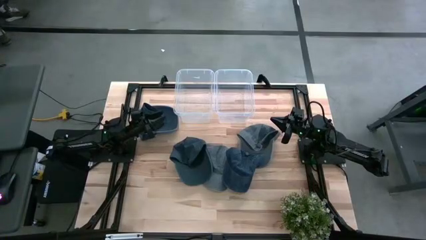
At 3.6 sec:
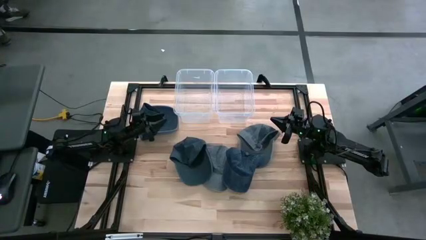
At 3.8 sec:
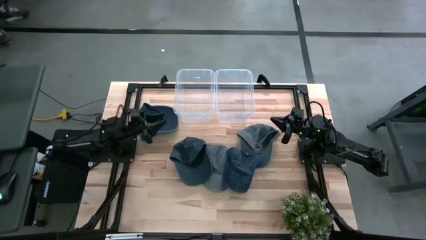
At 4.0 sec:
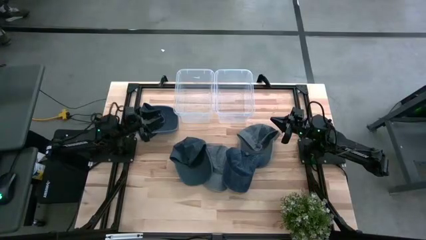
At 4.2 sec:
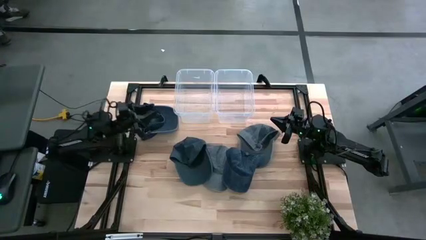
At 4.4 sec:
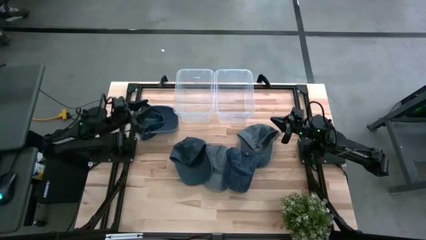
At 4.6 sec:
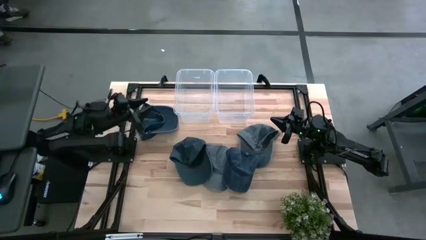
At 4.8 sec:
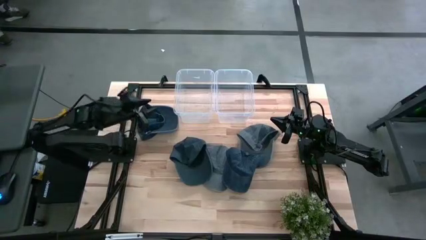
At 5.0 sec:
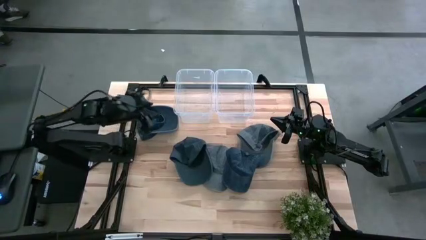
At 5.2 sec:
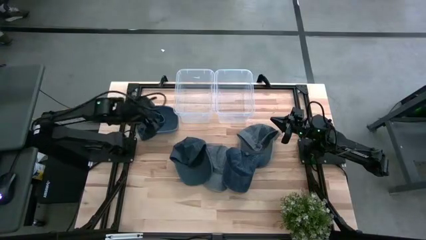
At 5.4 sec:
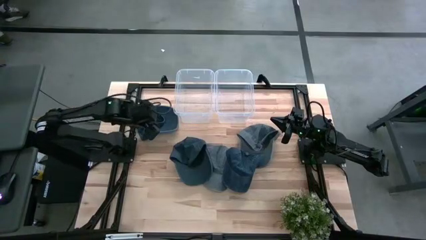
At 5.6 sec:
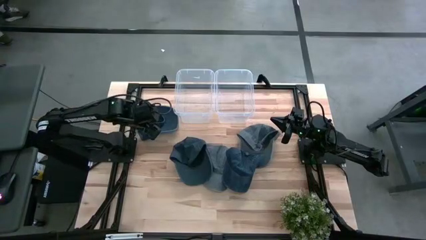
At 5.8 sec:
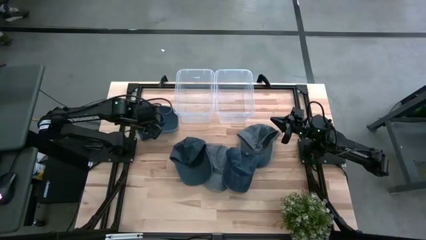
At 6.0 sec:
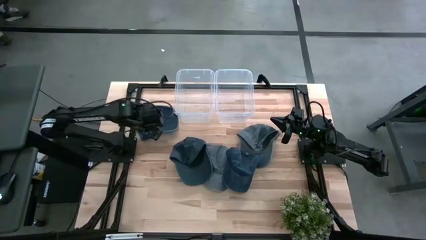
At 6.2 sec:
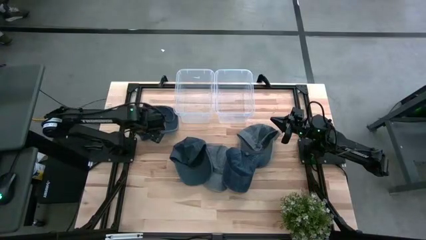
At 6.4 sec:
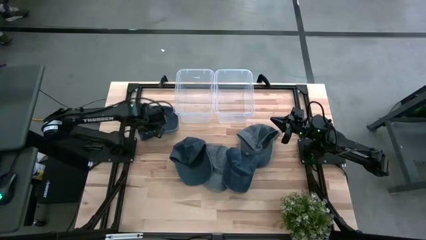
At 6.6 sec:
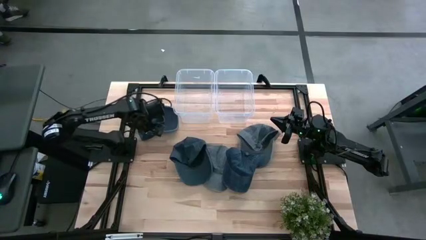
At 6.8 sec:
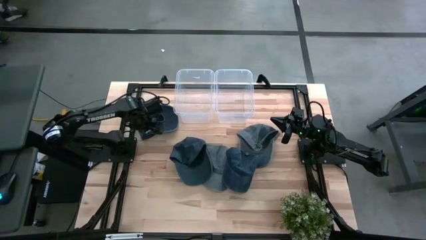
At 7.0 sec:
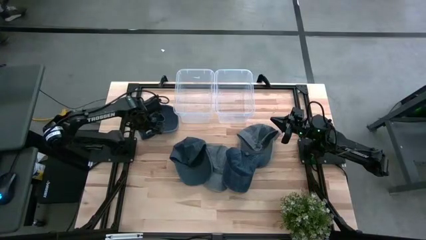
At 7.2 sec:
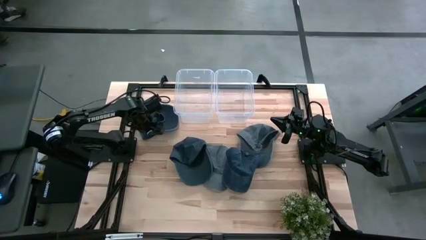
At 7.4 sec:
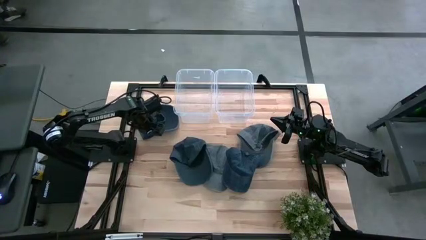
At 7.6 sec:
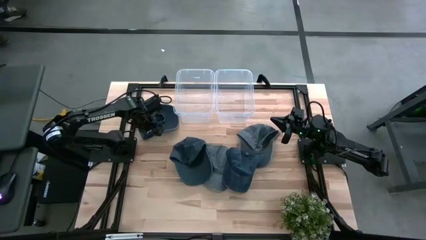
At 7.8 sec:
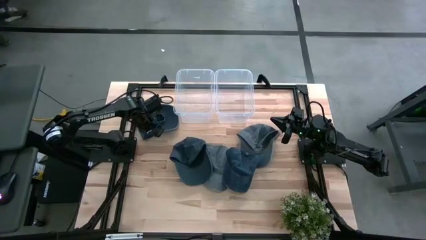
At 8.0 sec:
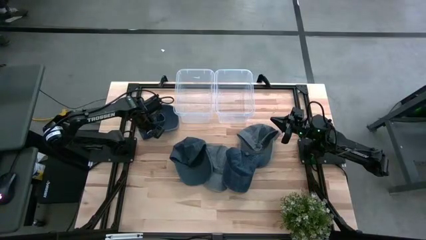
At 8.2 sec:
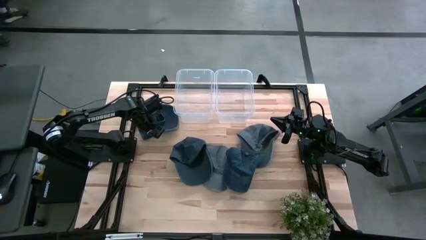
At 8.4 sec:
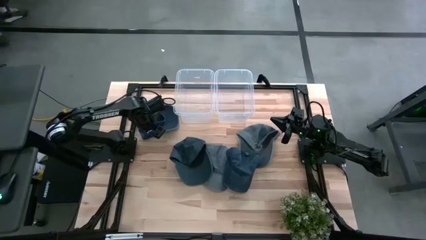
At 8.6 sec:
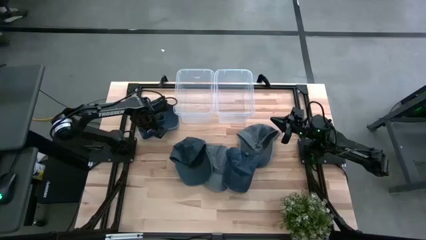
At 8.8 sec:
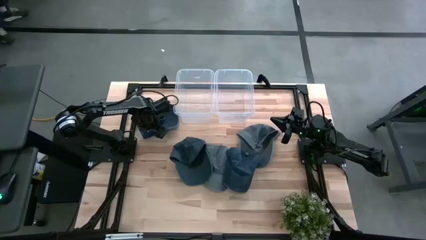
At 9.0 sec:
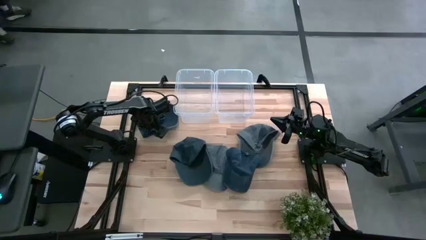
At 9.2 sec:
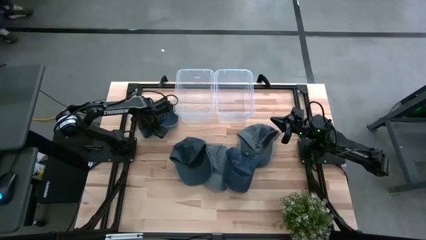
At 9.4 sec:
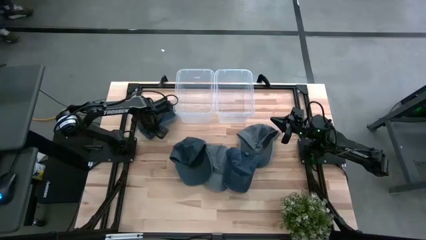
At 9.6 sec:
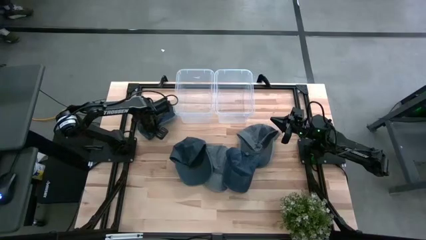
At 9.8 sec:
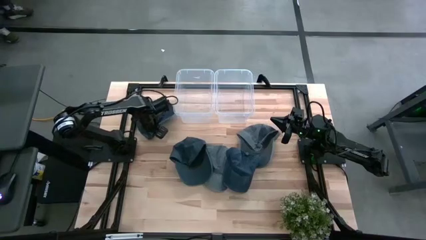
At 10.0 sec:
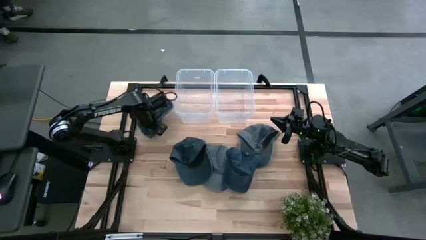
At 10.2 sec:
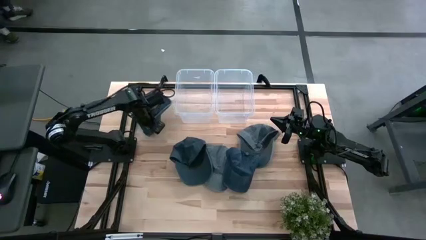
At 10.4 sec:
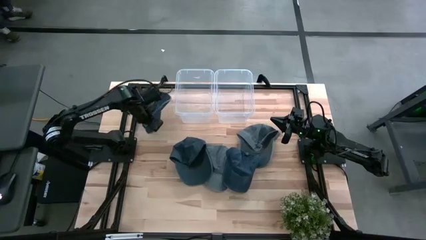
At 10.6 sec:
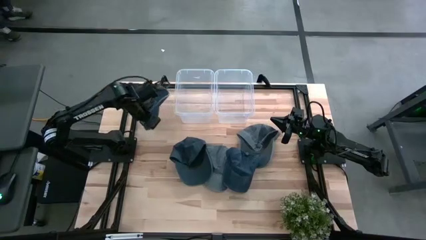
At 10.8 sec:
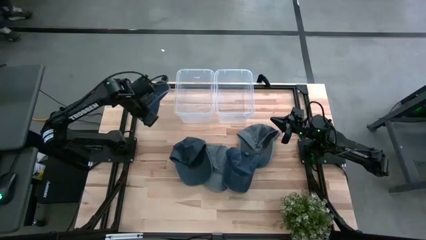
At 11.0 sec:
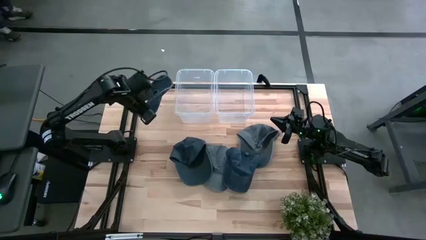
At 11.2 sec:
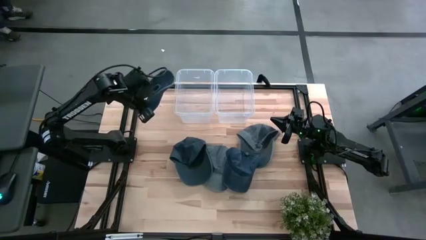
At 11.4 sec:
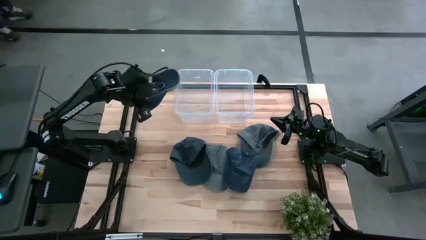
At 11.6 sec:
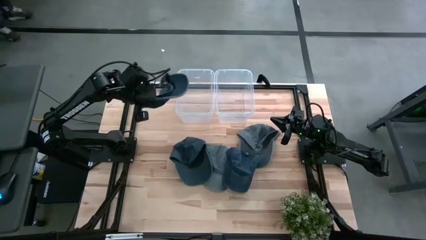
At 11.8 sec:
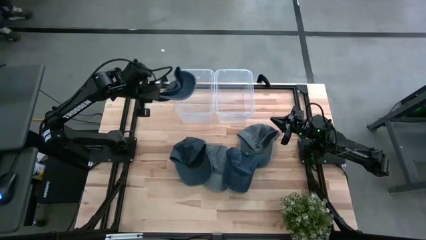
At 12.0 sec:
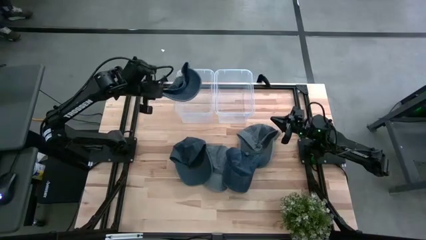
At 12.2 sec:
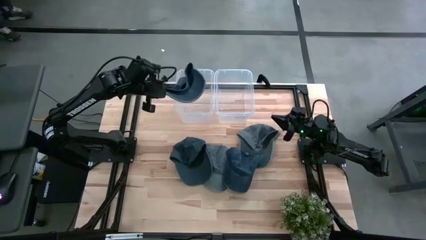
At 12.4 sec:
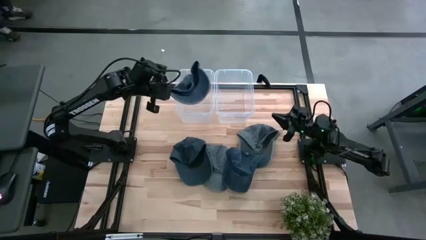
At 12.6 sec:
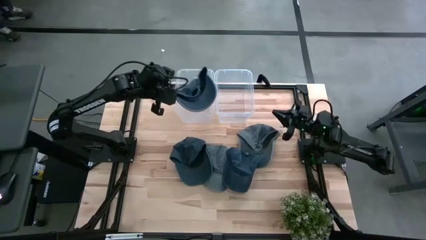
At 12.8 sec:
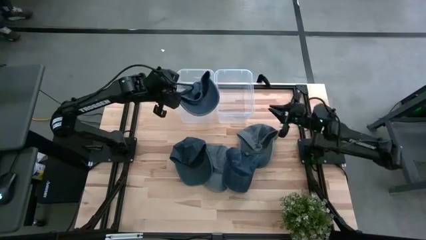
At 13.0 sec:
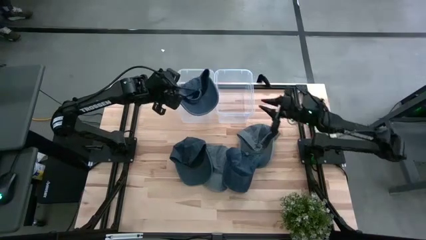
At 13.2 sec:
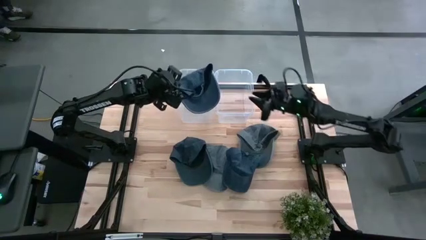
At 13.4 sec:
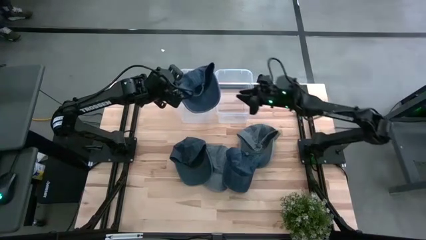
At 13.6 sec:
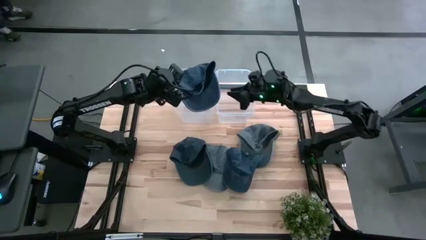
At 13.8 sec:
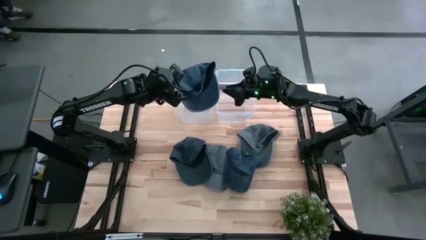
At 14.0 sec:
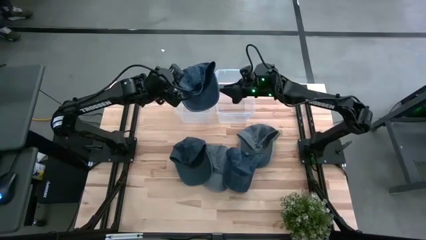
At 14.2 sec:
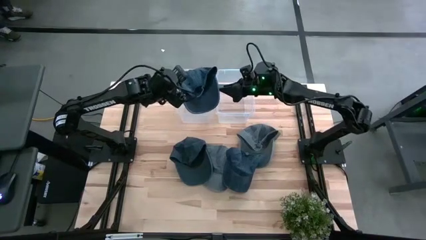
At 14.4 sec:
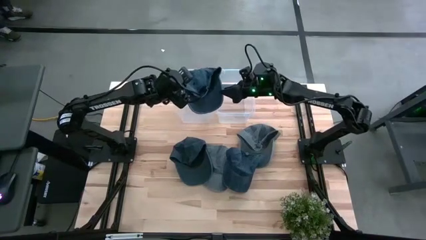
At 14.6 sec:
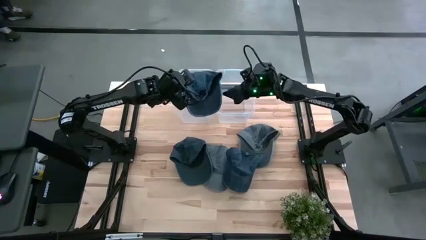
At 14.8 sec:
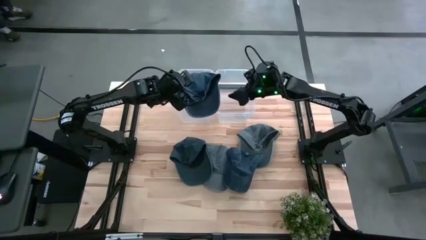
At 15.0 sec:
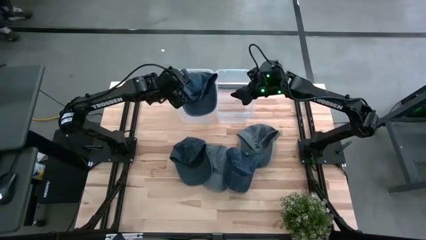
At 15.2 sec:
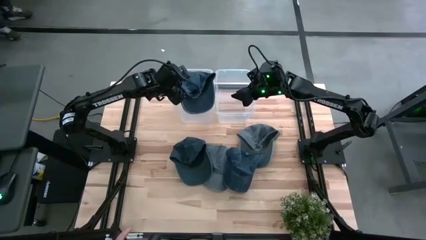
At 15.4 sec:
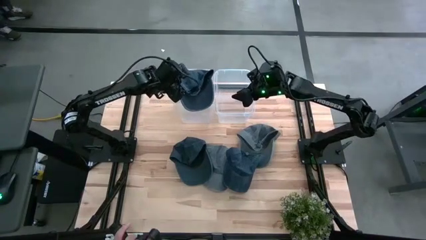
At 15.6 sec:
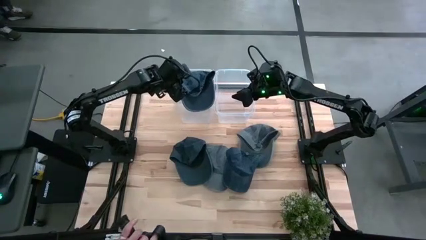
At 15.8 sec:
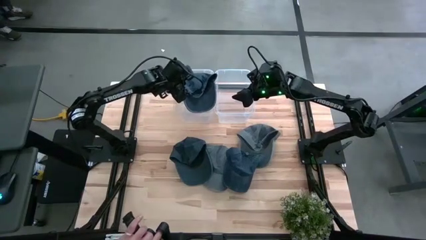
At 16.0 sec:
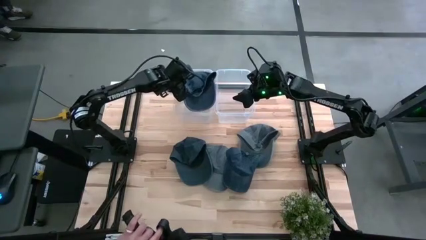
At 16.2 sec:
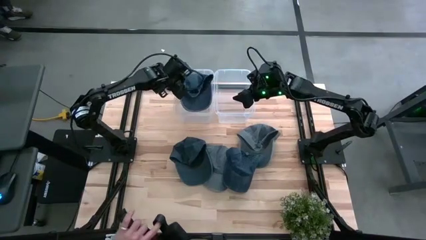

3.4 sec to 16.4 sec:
Task: Pick and place caps into container
Put the top blue cap into the left transparent container

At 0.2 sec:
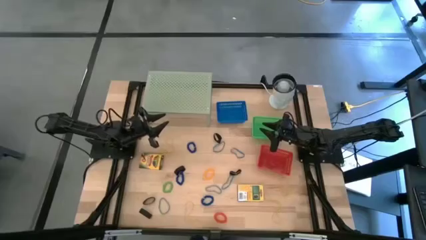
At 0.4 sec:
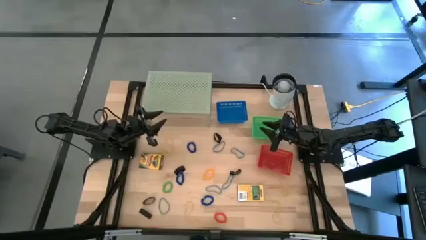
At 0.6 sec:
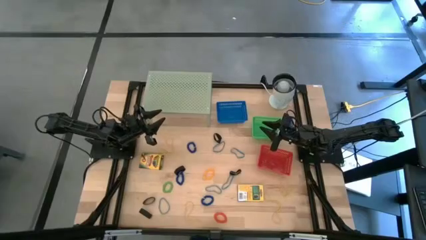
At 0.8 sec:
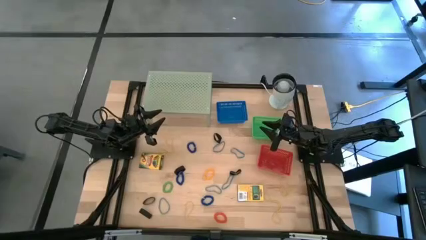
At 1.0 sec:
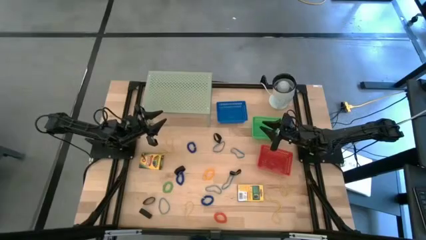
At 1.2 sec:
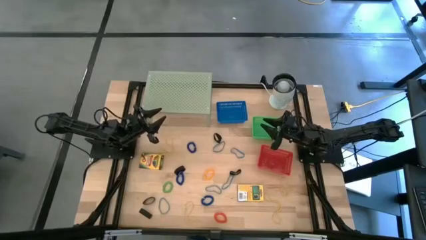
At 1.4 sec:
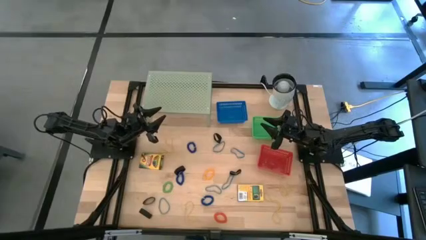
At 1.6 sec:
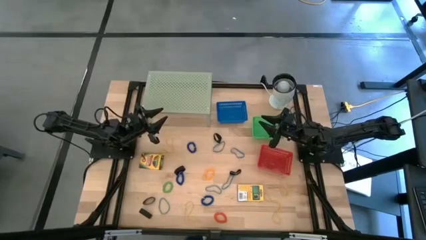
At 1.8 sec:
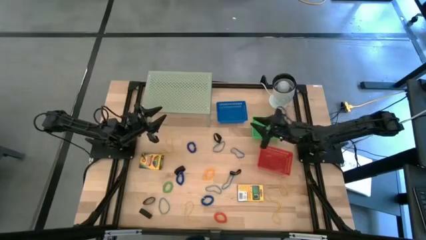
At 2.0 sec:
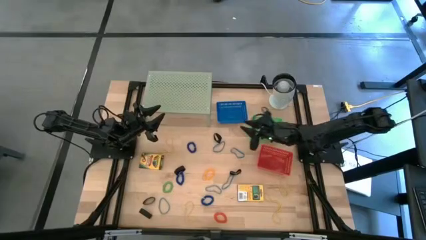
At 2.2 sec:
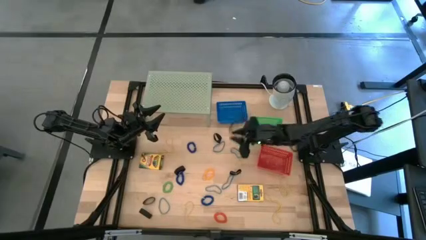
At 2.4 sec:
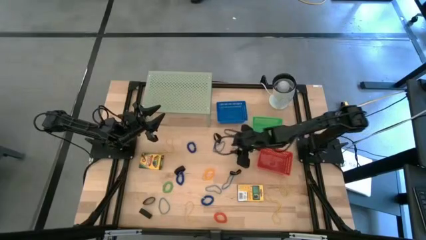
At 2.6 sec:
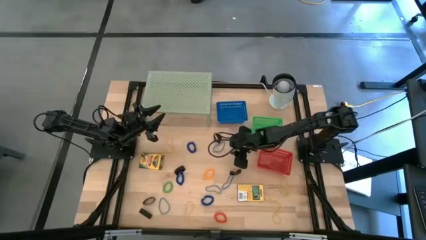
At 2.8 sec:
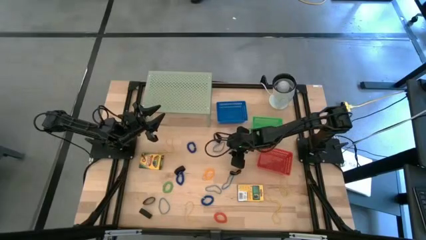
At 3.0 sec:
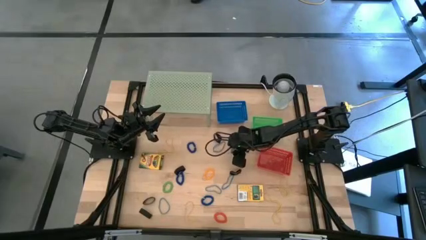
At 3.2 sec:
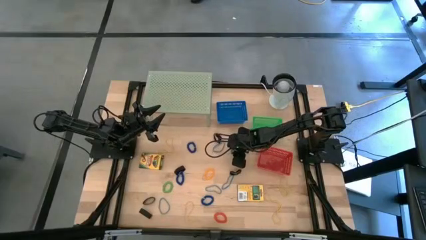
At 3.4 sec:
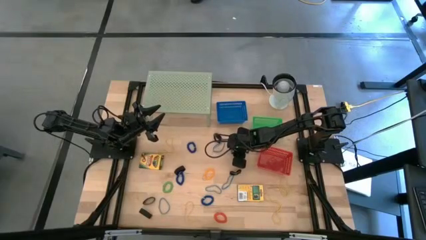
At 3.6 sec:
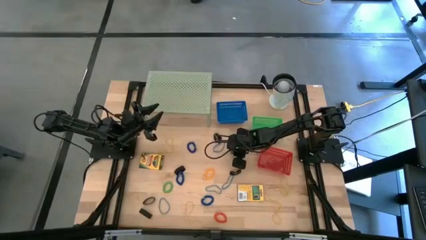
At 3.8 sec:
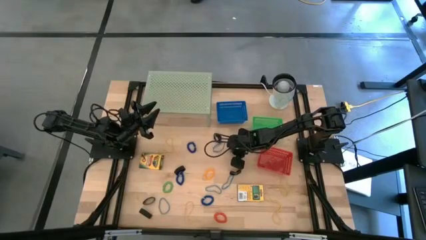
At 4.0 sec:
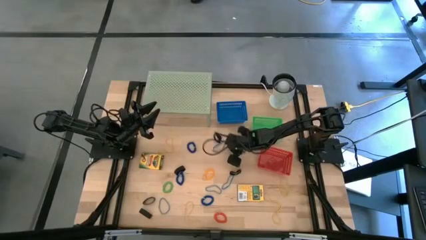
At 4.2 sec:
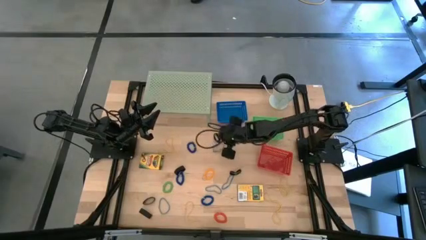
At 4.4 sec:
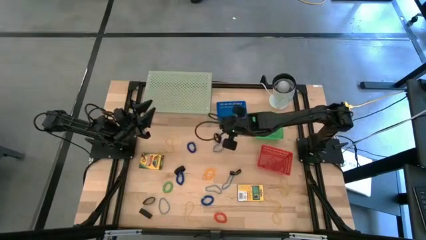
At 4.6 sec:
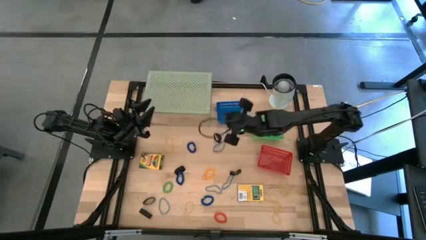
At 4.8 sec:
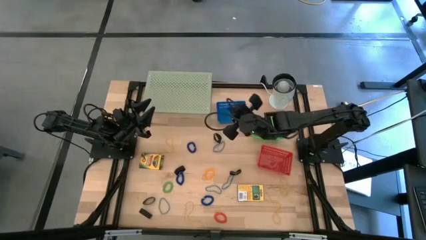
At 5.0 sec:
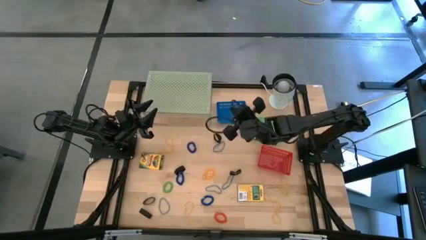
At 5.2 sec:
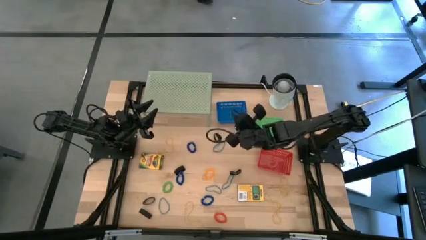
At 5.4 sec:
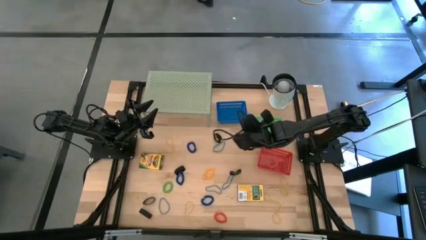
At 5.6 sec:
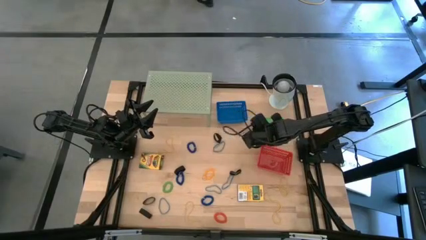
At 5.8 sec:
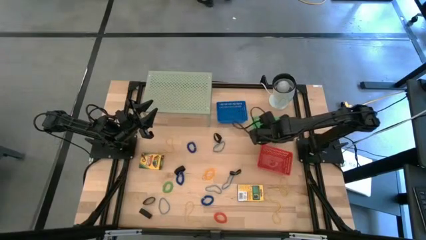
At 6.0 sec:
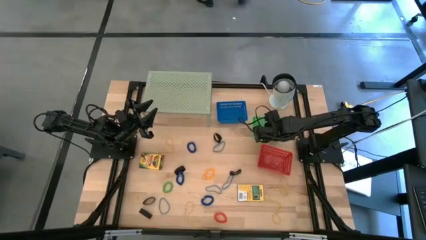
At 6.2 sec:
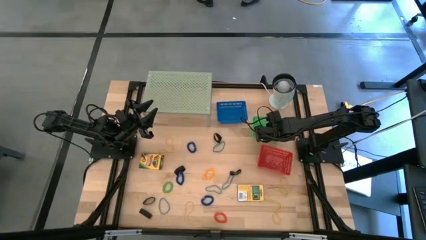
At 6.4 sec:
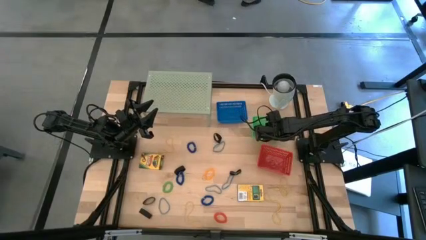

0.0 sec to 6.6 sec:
Task: Pick & Place Office Desk Supplies
Put the blue rubber band into the green bin
